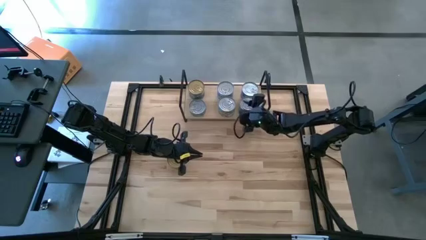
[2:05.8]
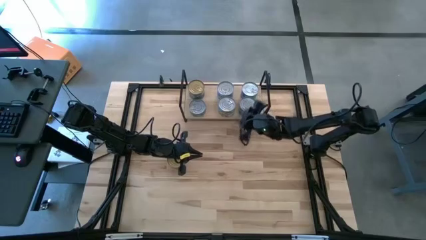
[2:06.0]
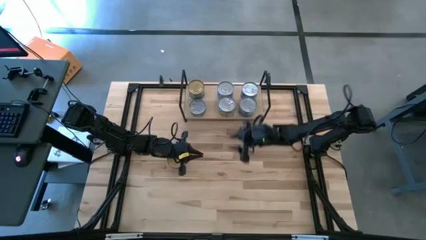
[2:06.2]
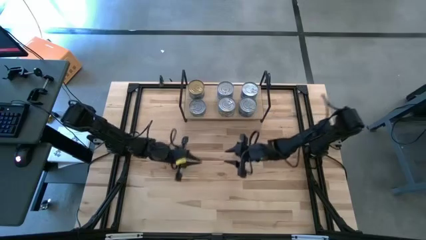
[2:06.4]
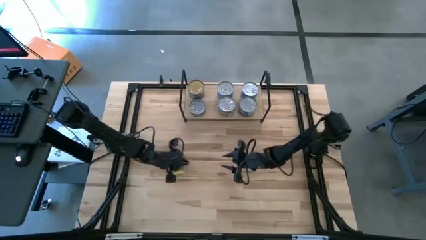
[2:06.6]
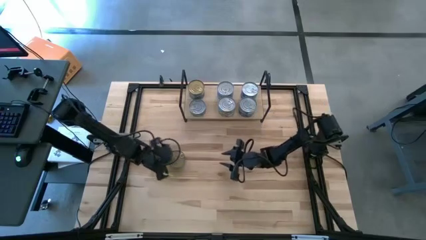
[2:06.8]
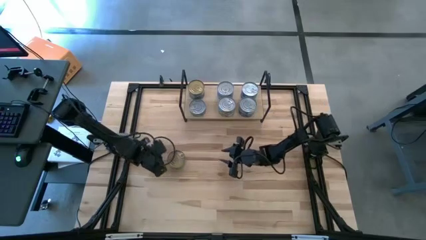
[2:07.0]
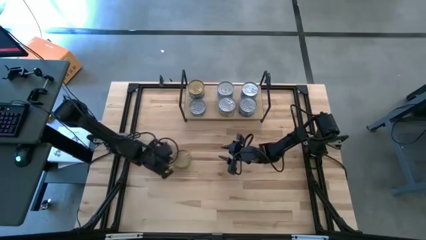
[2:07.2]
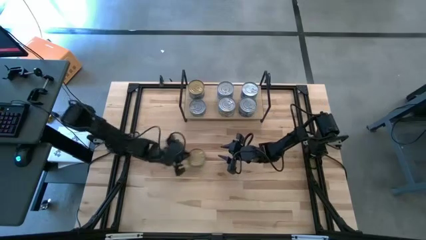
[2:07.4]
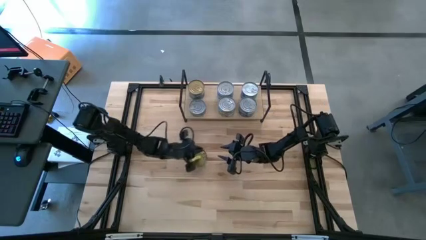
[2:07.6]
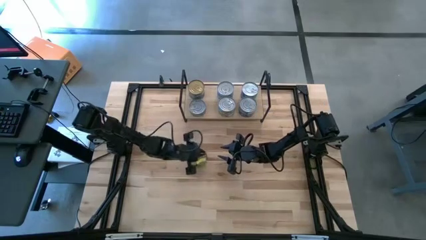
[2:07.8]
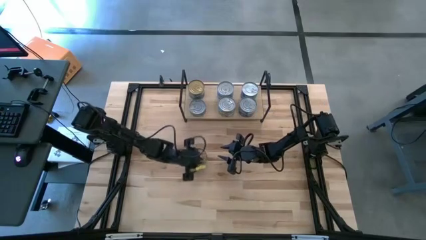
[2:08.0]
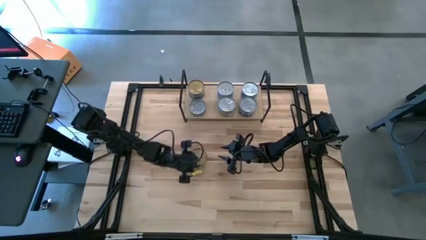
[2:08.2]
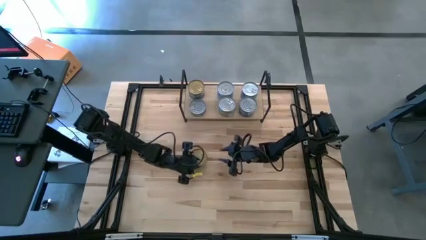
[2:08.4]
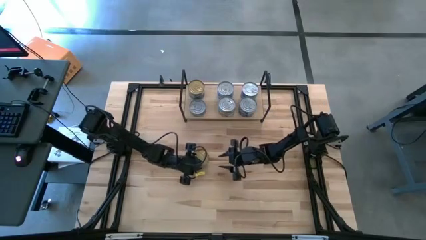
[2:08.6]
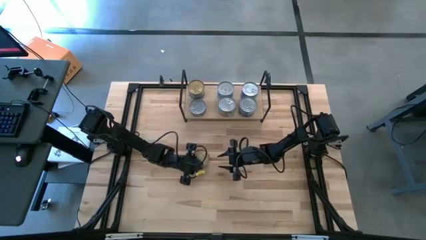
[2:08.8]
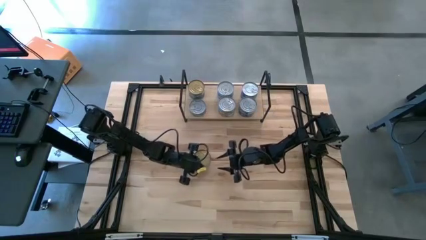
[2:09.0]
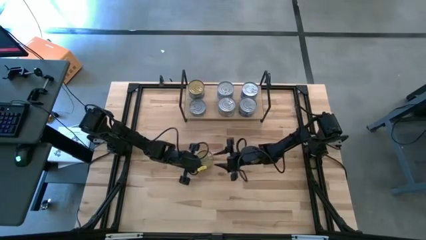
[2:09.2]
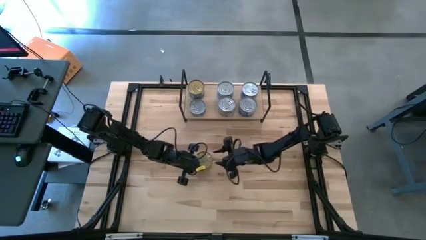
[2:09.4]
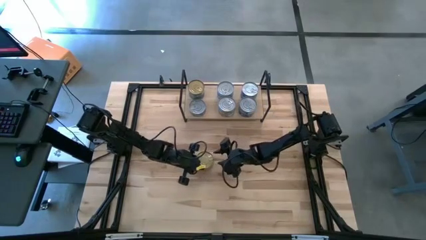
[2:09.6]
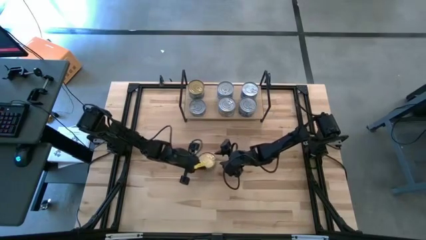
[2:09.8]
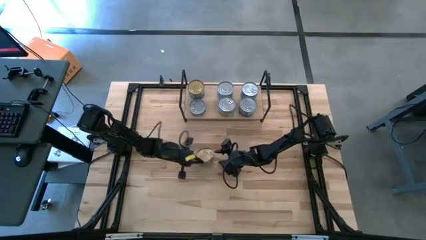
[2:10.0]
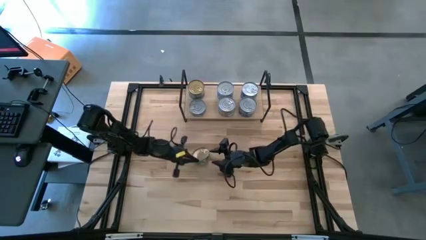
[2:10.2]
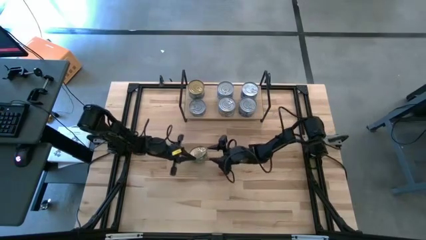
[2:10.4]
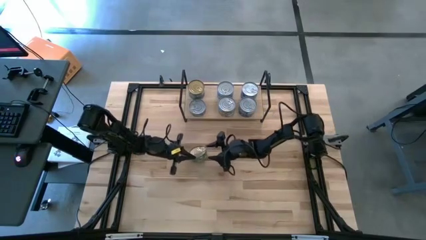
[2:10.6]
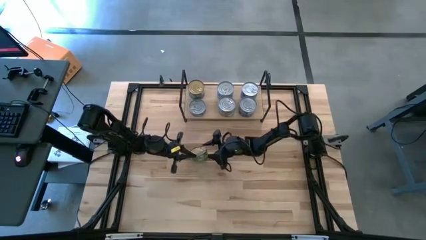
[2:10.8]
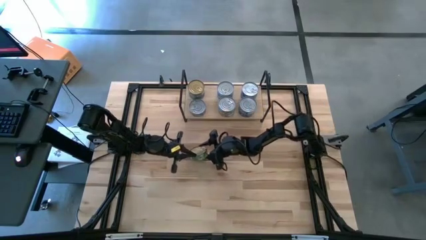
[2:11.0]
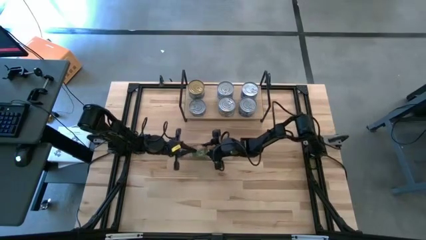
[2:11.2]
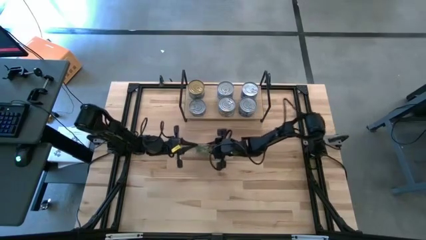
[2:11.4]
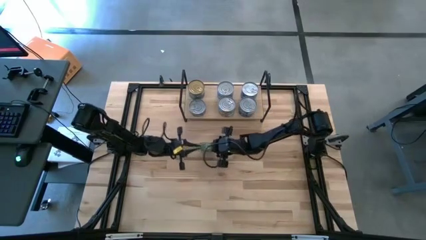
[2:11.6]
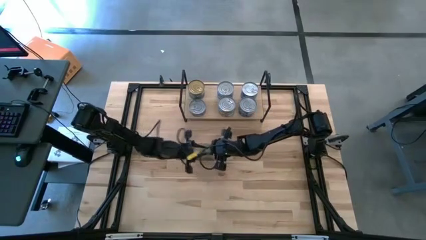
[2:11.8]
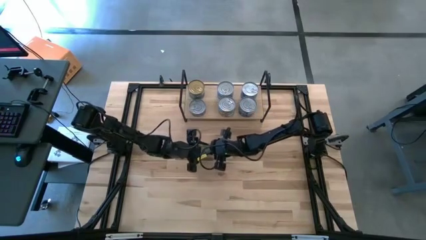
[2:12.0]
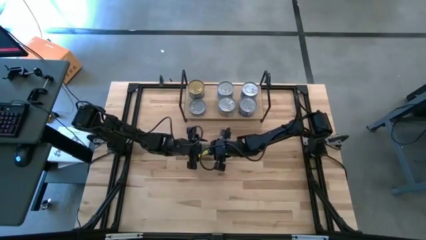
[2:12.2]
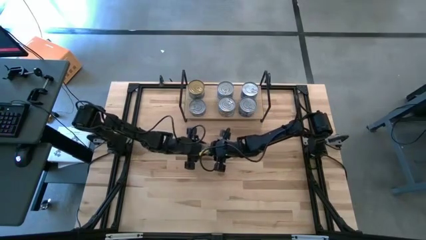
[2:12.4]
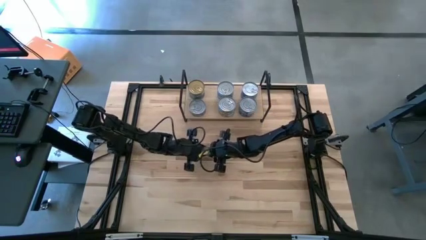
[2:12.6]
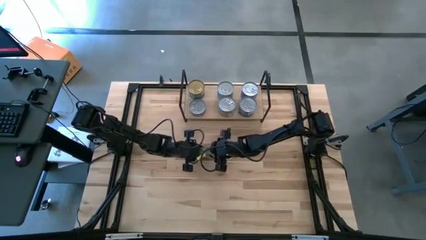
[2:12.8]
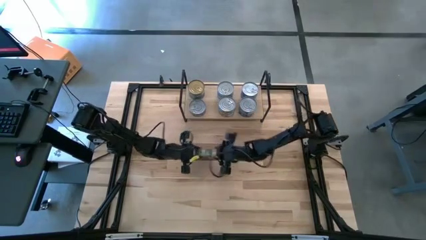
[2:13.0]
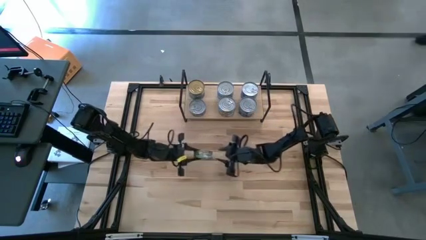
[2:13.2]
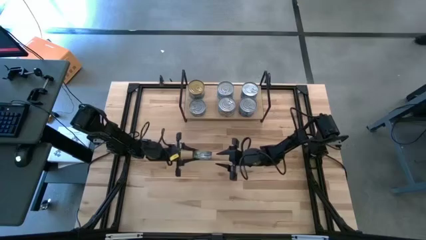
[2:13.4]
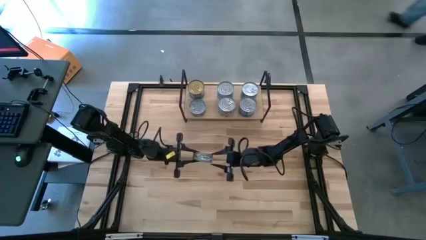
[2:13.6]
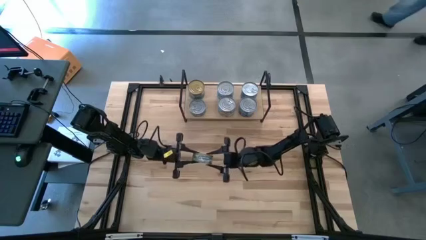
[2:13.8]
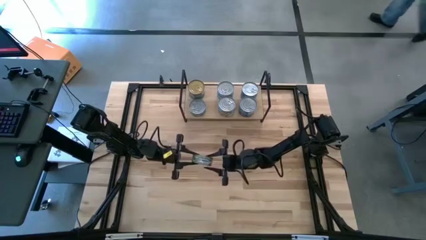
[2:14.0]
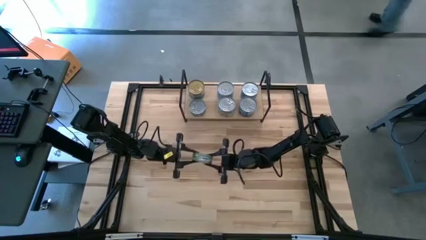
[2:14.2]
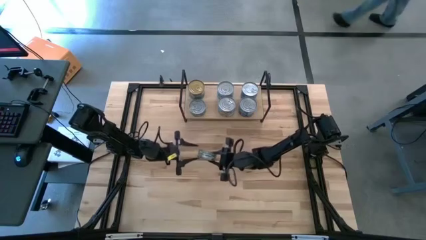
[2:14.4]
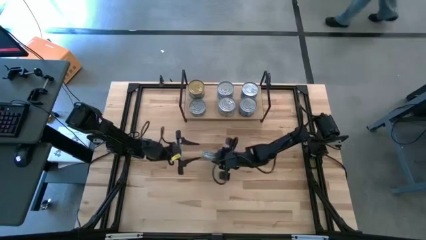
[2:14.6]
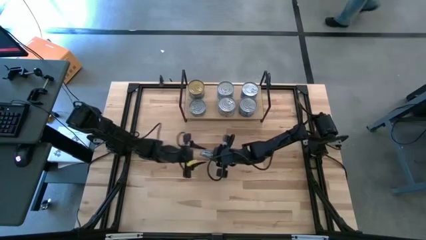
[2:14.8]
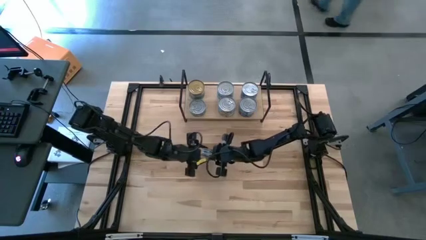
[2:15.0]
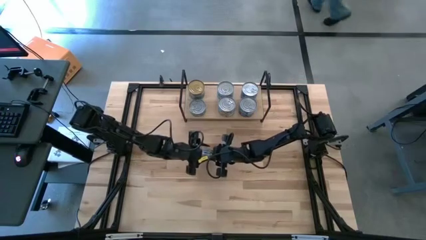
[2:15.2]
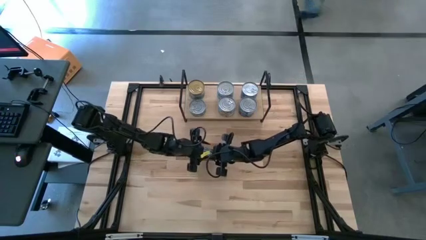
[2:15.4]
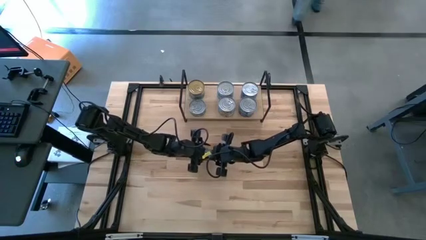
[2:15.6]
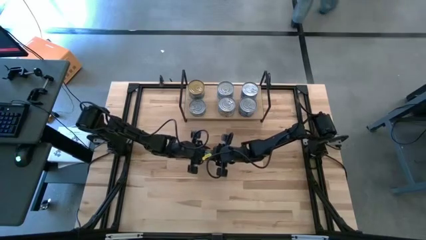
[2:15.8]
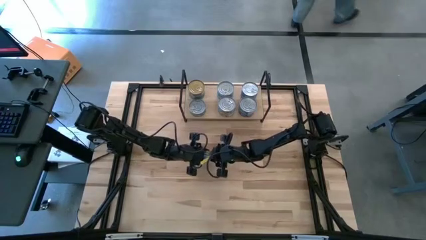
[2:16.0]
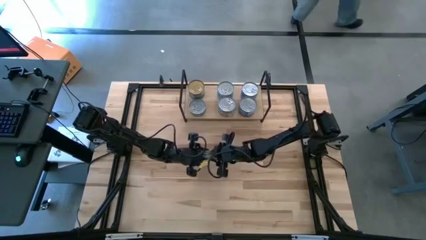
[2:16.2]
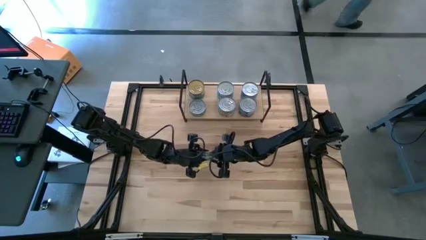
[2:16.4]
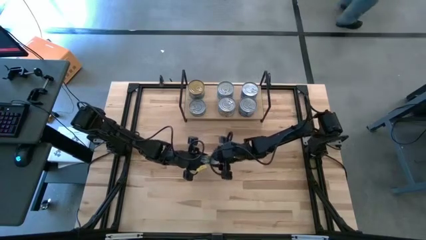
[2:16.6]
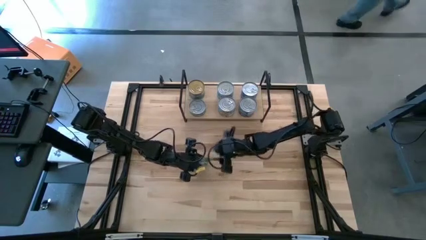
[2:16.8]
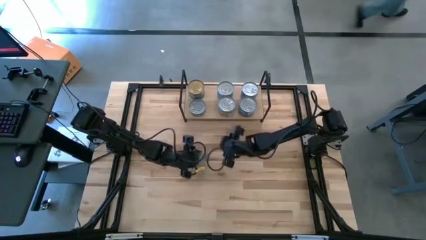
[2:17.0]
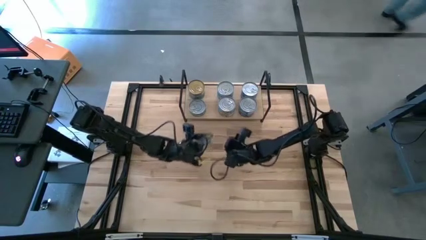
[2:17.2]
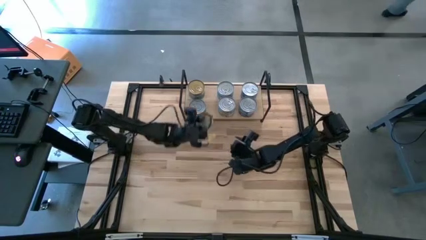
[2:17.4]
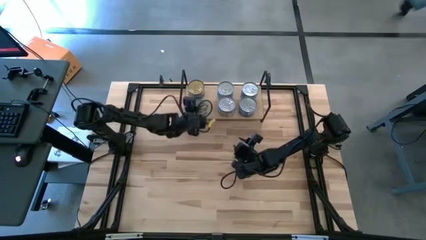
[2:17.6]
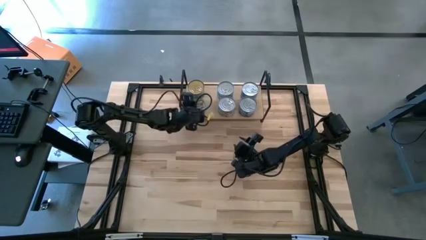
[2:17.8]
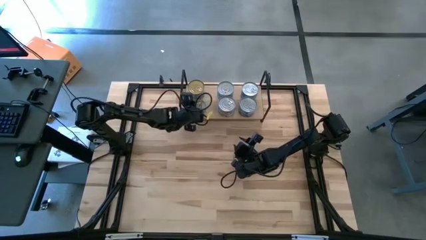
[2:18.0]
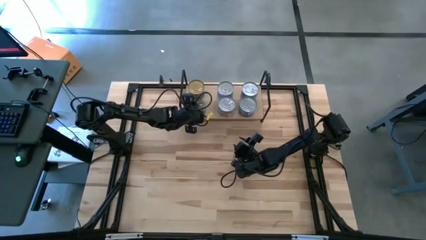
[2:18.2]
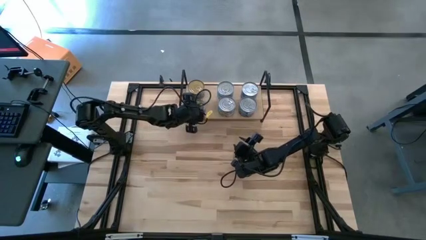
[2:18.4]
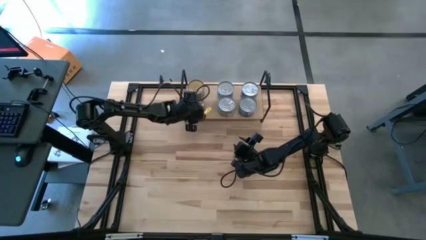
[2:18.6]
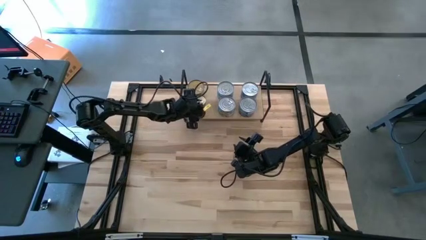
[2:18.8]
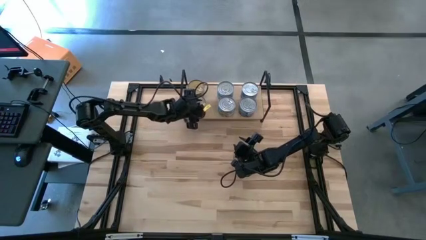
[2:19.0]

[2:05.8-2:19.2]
Task: Stack canned seafood by type on shelf
Stack the green tuna can on top of the other green tuna can on the shelf
